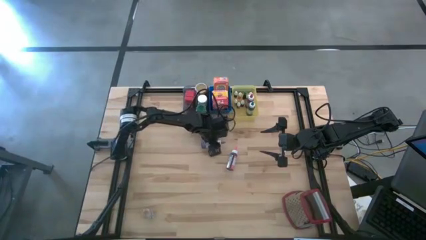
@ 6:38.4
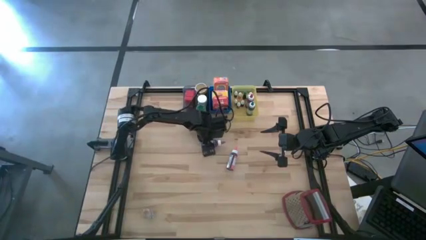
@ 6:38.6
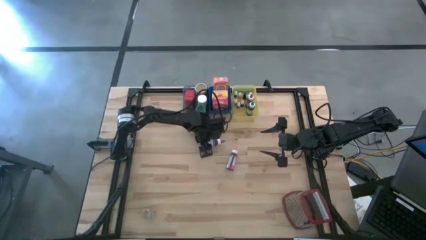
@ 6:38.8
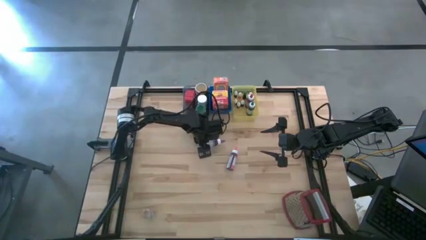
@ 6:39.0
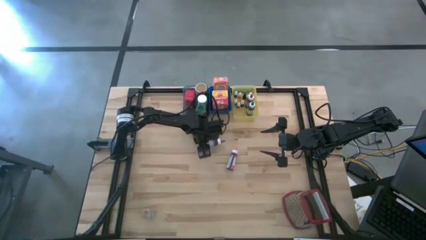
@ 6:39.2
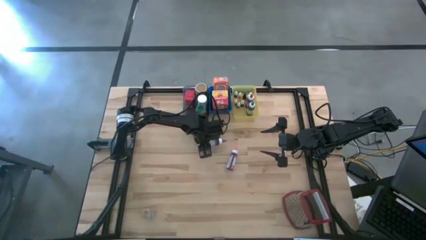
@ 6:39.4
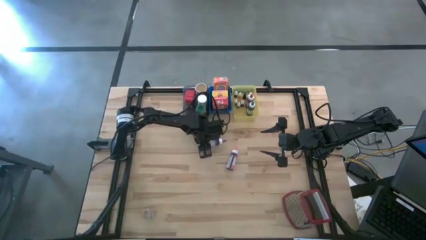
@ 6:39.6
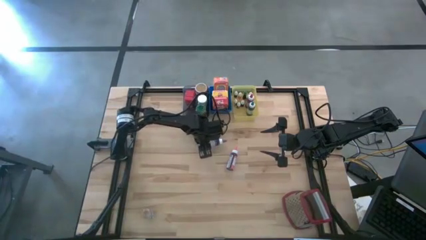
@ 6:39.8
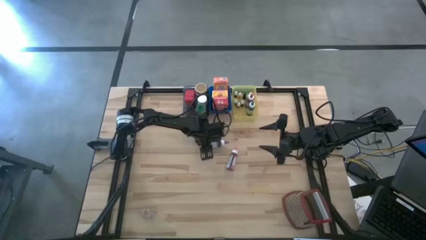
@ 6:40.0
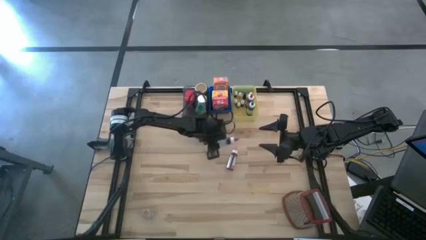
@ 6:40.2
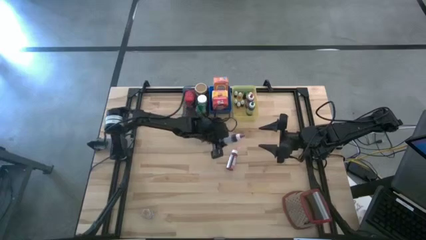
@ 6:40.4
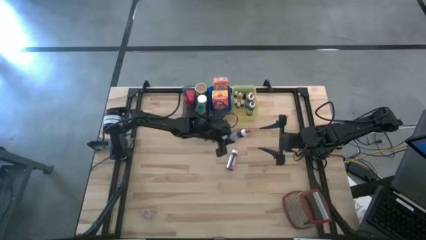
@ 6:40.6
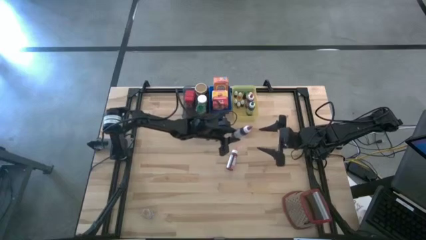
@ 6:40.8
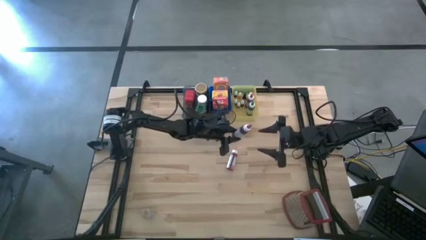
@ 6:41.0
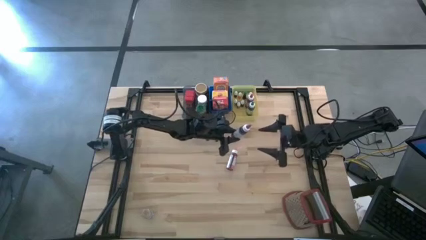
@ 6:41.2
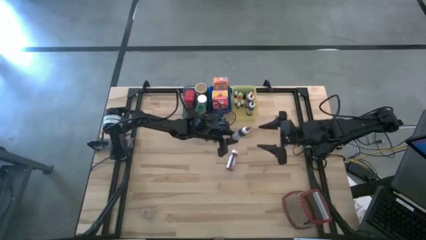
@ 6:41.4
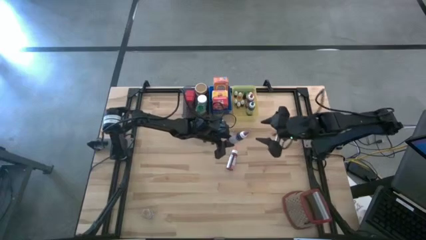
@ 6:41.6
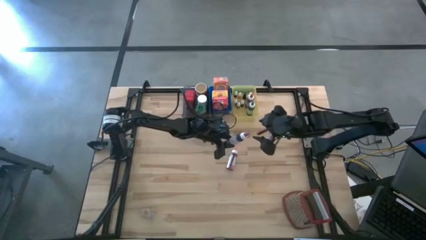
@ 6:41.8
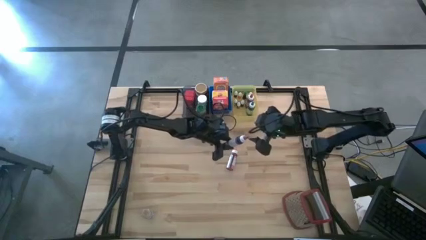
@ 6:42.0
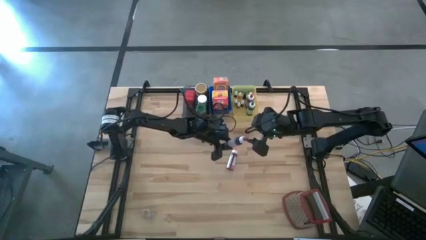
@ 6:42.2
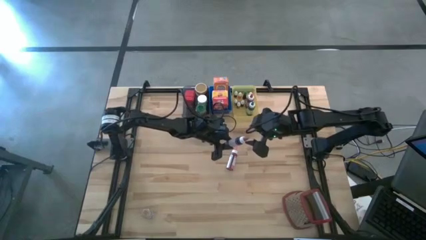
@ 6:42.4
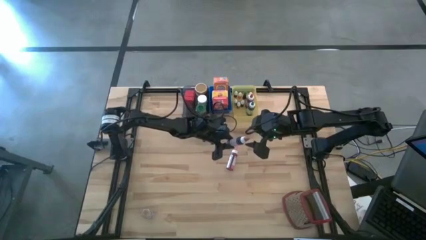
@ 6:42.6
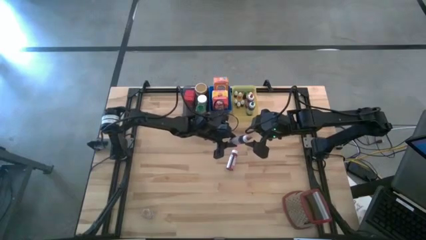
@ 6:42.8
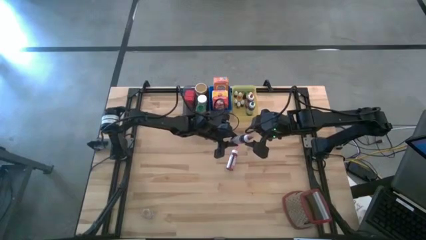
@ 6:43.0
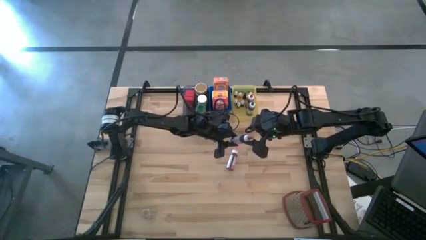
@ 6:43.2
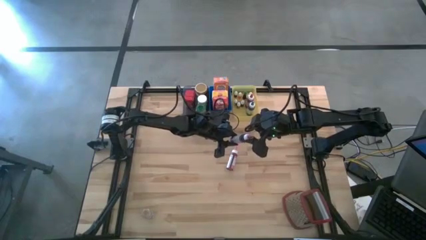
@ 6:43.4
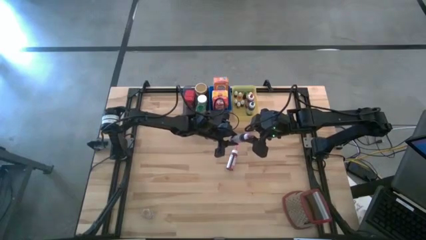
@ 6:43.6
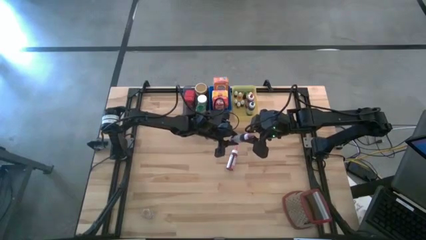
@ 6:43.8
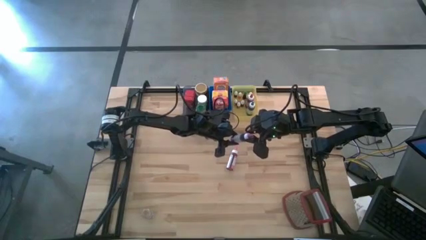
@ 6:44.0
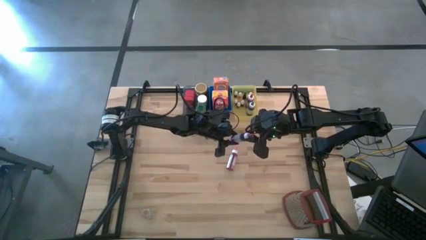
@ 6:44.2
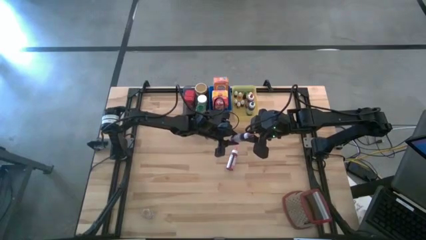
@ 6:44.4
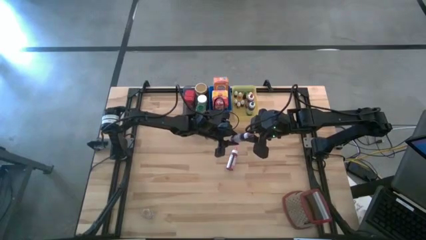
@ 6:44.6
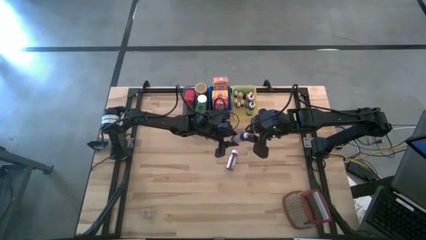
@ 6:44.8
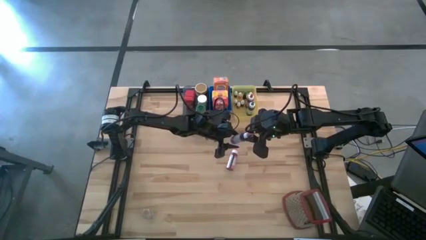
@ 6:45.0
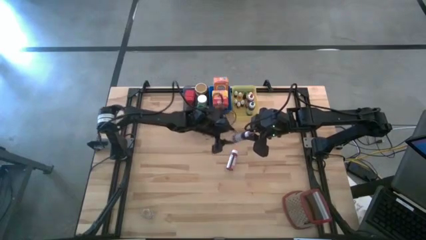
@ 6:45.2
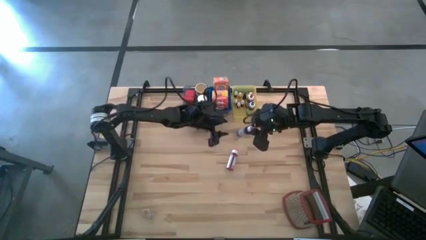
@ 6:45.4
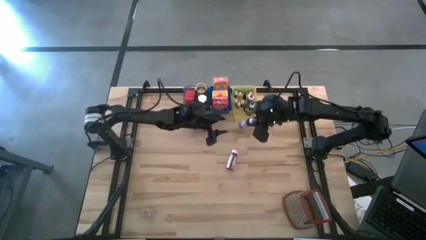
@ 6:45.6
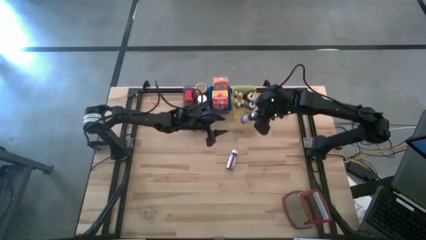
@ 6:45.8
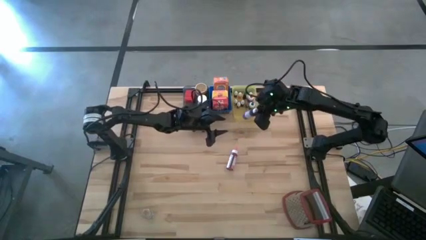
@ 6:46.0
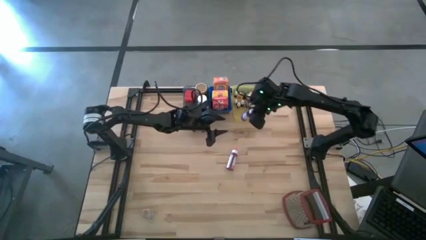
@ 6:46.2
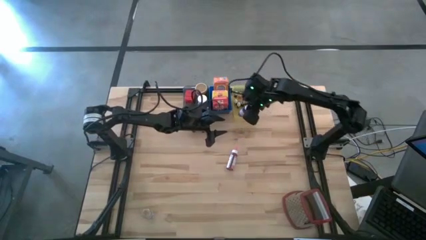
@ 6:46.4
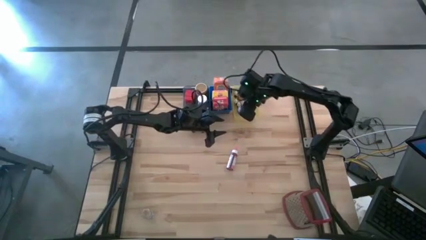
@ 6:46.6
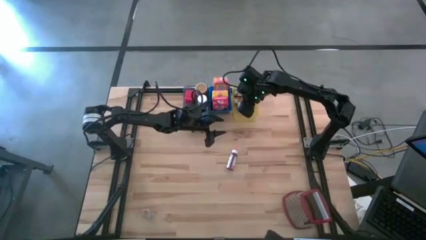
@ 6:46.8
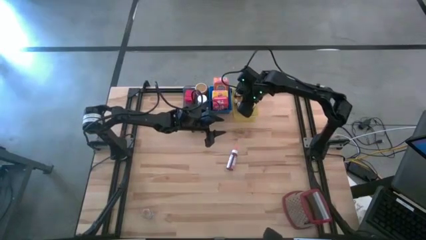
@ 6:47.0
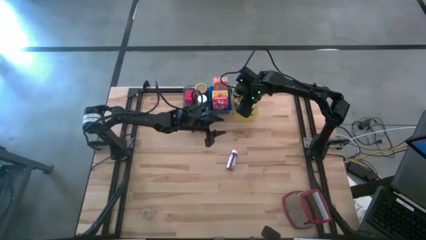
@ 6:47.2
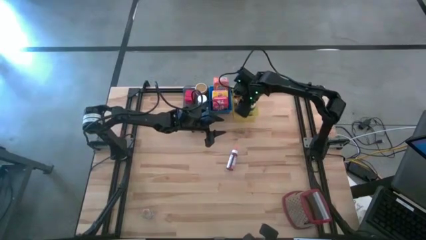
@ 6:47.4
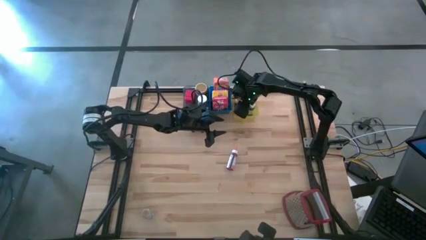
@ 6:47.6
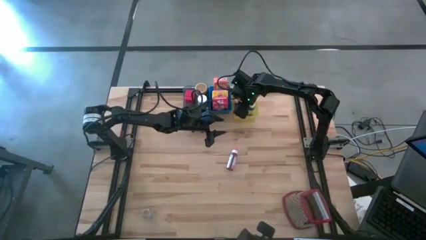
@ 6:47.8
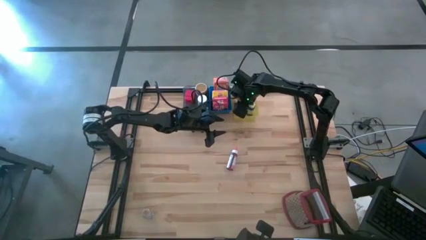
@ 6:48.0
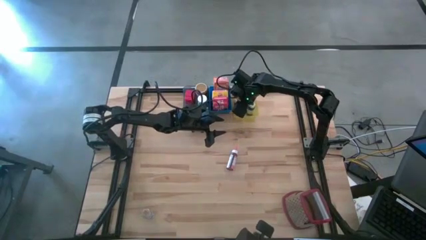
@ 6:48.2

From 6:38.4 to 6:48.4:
Task: Pick & Place Kitchen Items
Put the large violet food coloring bottle into the yellow bin

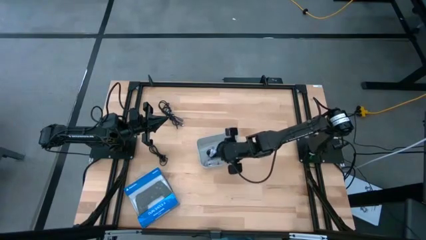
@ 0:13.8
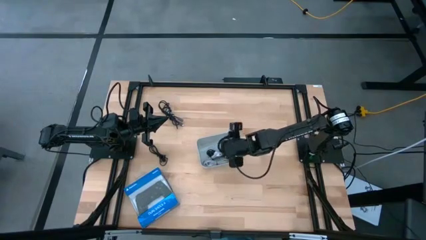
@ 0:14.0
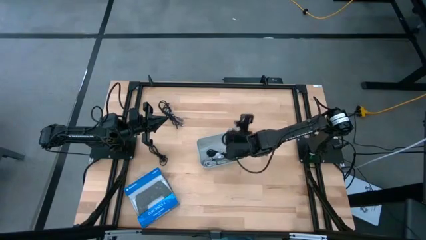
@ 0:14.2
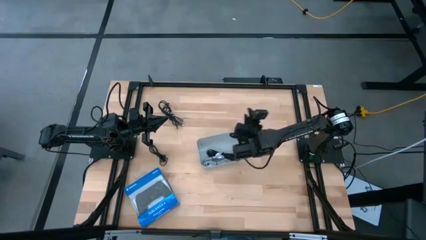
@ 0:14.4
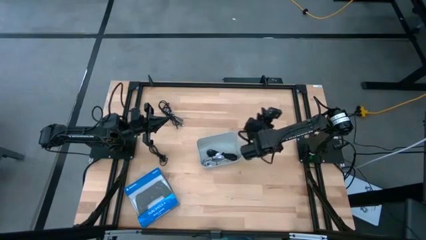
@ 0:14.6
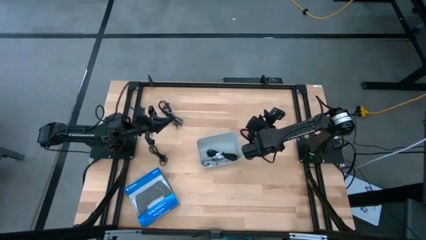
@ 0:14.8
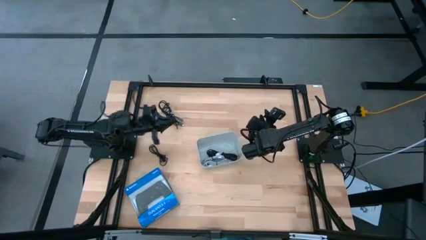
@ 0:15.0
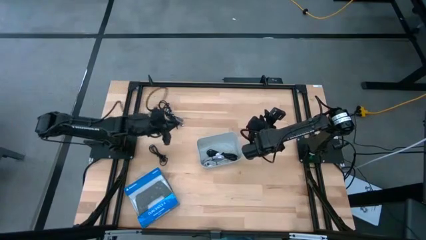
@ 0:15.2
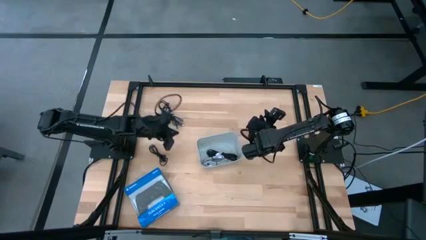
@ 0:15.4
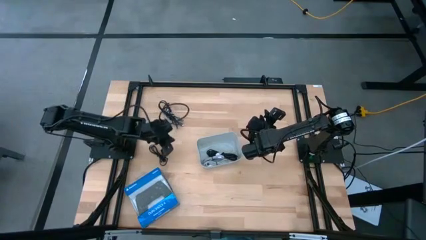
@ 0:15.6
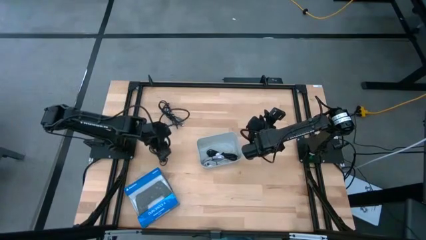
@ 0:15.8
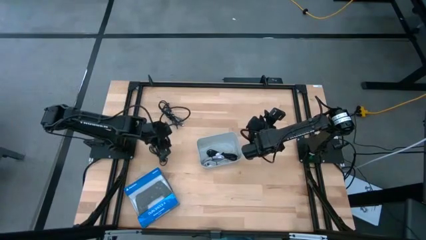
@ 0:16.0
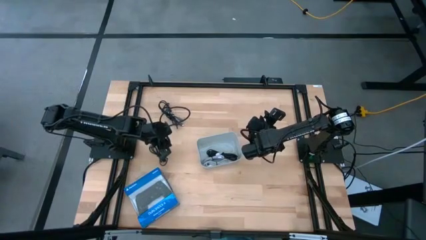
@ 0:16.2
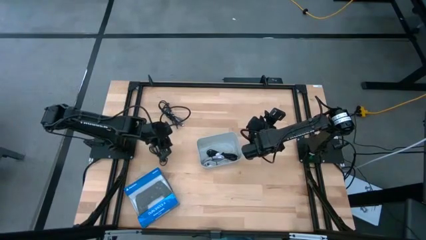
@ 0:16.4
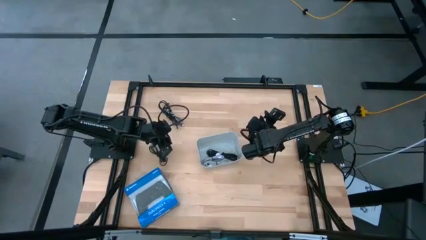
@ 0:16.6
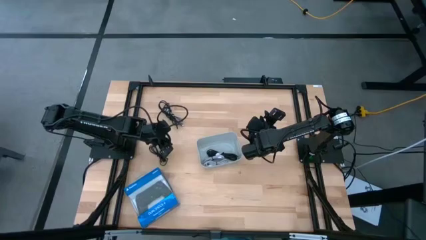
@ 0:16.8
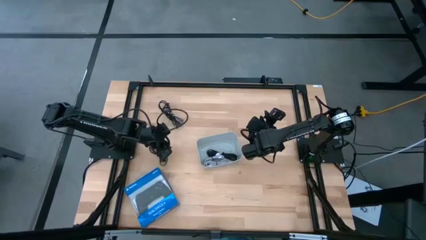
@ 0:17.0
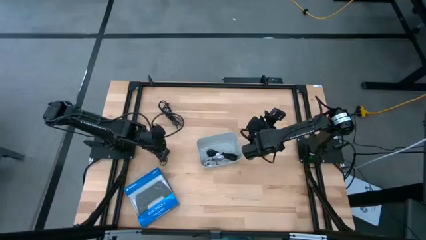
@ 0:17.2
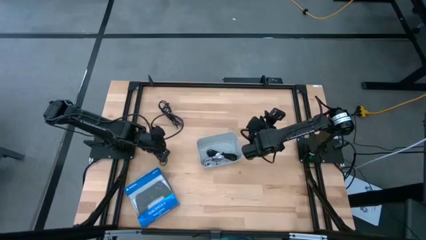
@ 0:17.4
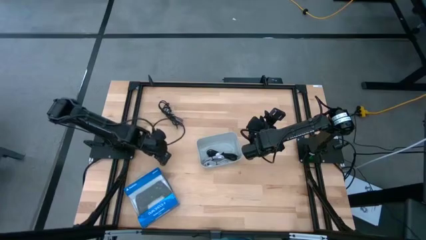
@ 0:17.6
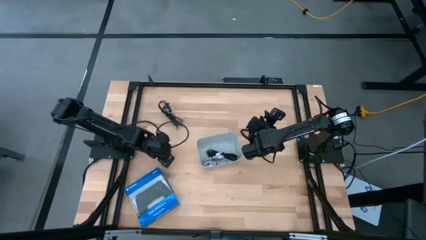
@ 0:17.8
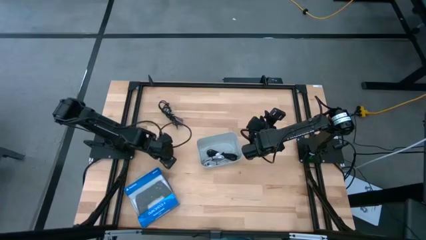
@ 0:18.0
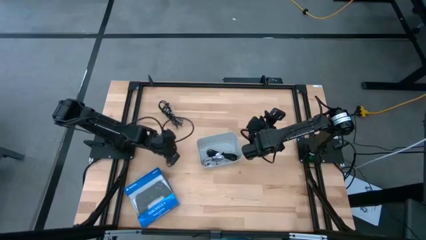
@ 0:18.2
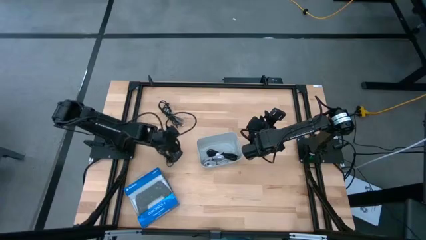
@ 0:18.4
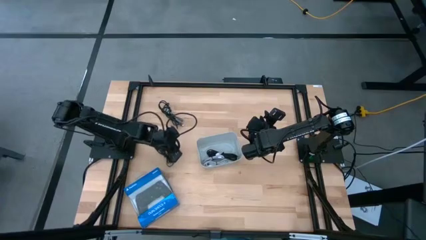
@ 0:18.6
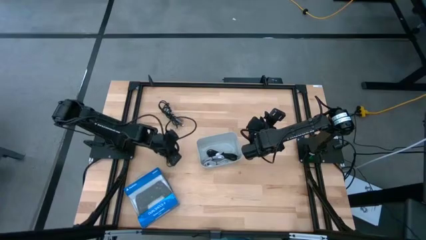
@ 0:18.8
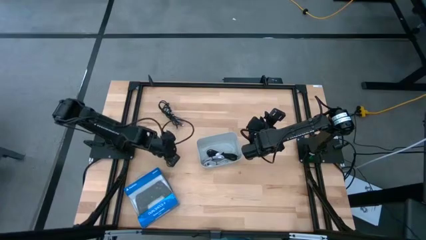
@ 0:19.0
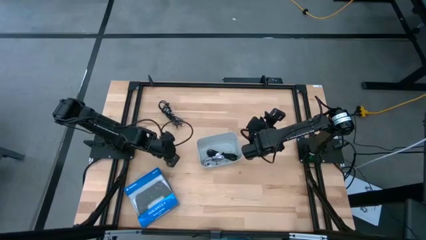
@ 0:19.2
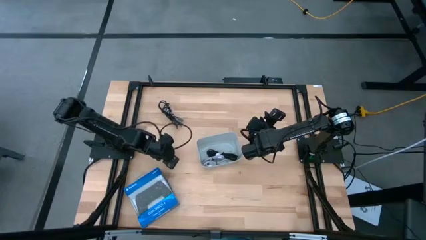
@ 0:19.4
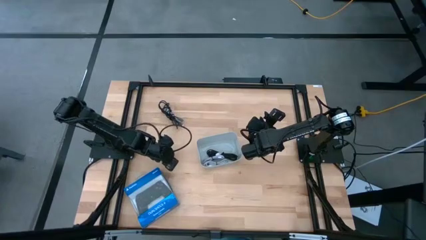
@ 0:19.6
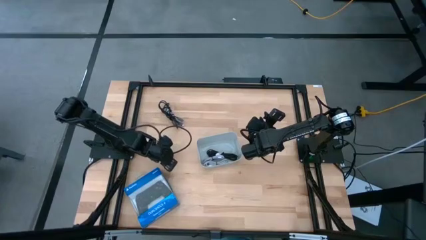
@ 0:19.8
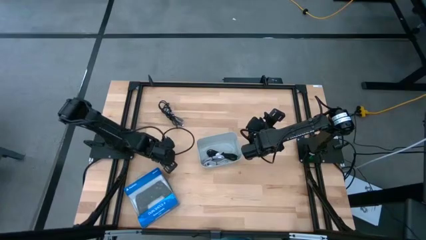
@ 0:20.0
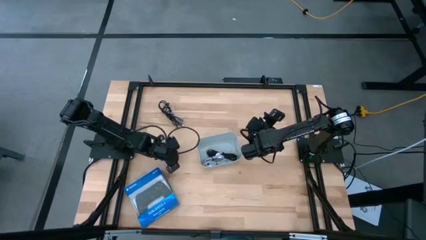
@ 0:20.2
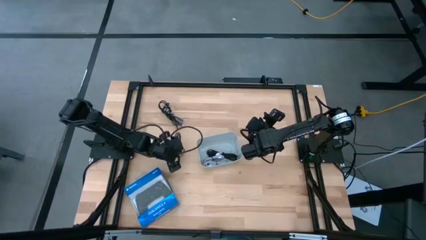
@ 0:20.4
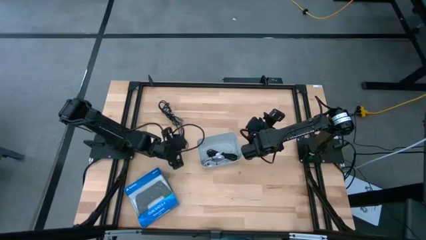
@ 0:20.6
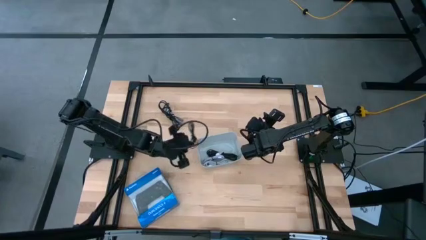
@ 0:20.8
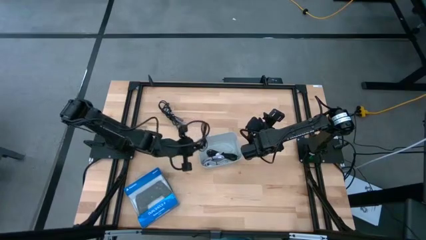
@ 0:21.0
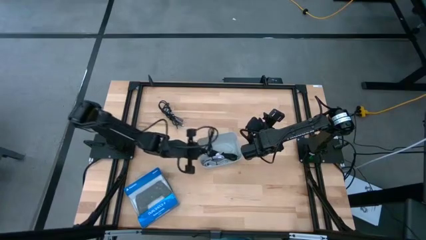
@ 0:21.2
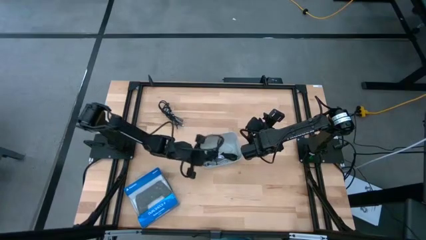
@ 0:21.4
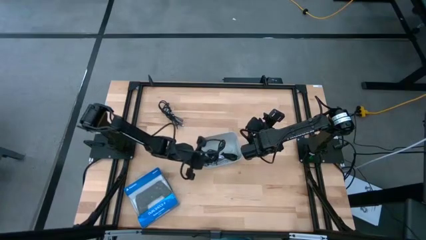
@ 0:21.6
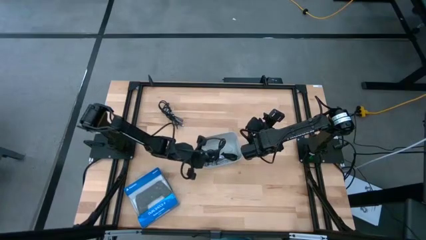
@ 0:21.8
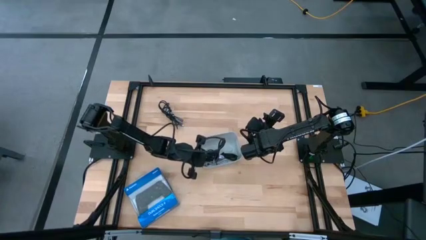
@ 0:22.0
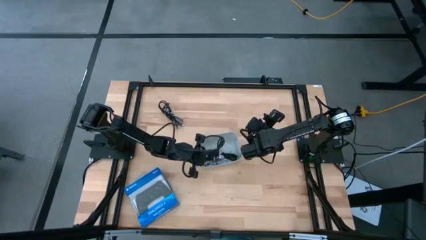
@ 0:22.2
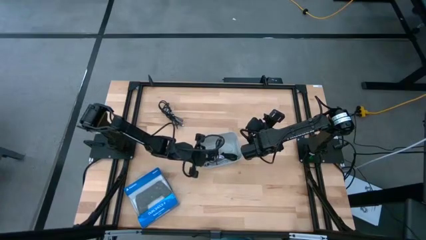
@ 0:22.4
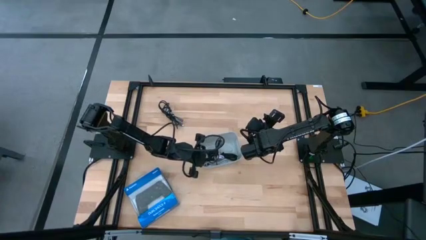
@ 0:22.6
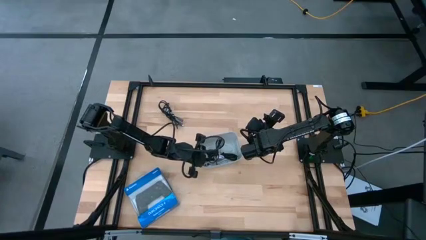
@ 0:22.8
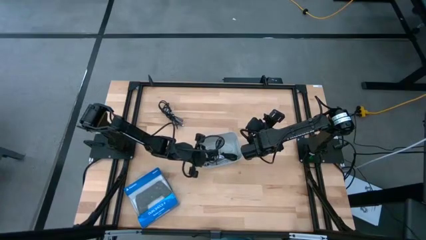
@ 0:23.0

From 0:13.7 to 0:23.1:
Task: Pick and place USB-C Cables
Put the bottom black charger cable into the gray bin
